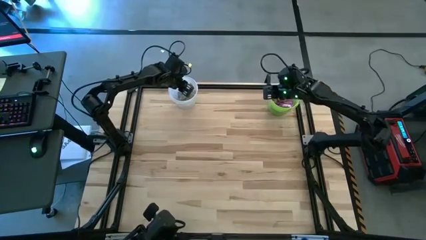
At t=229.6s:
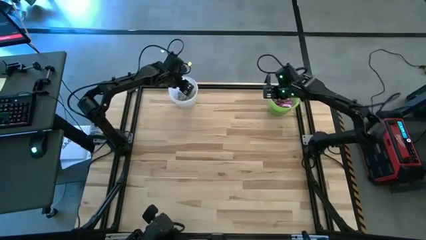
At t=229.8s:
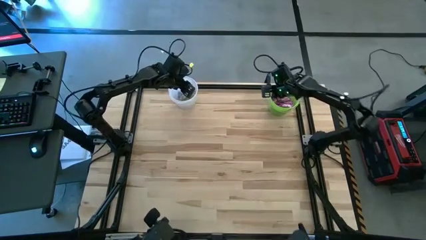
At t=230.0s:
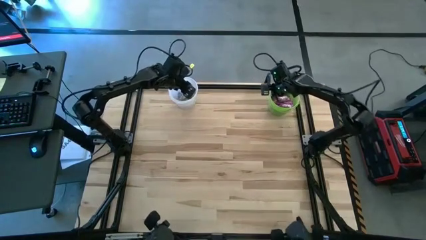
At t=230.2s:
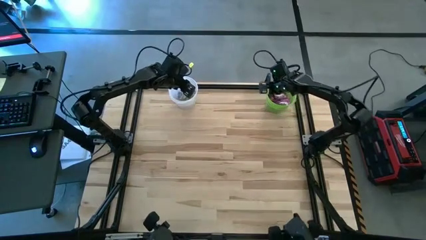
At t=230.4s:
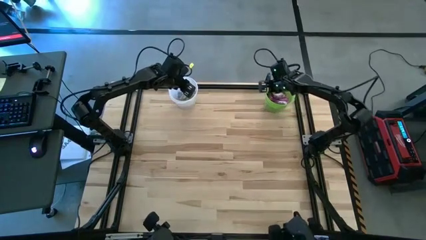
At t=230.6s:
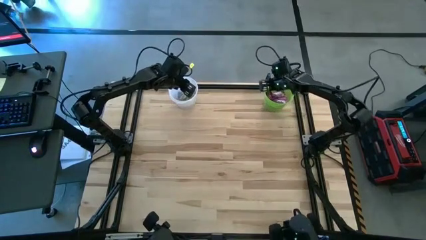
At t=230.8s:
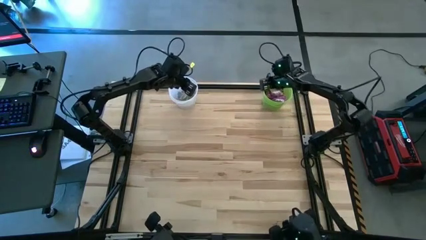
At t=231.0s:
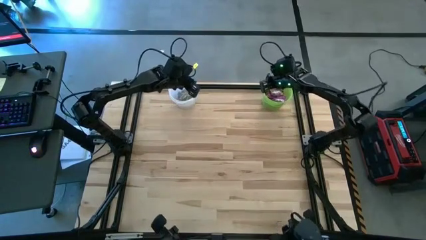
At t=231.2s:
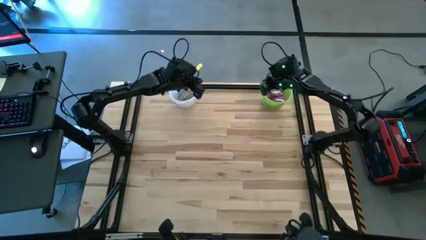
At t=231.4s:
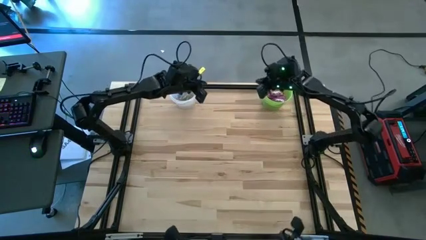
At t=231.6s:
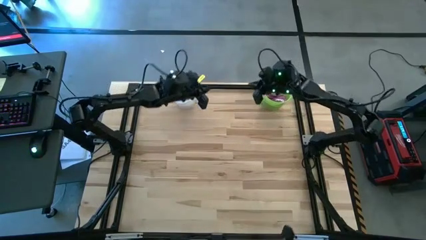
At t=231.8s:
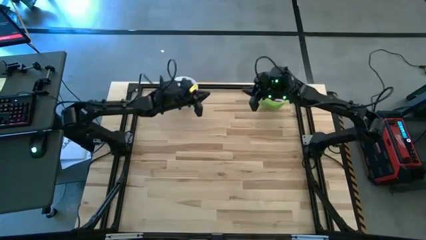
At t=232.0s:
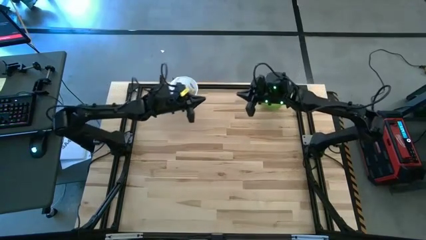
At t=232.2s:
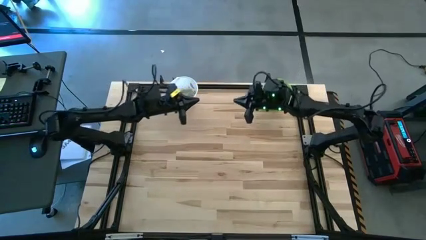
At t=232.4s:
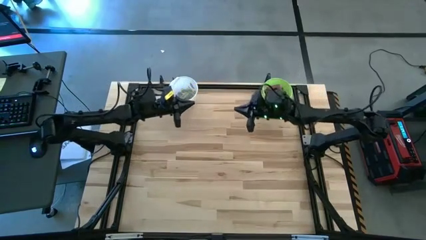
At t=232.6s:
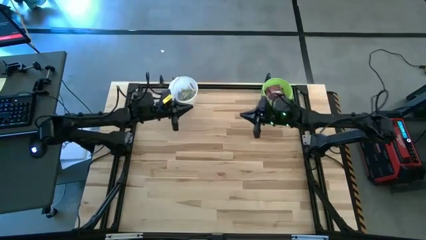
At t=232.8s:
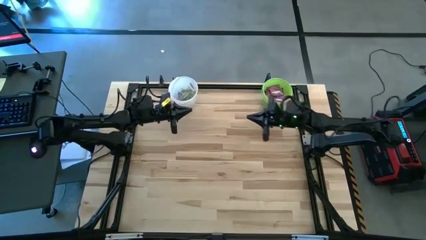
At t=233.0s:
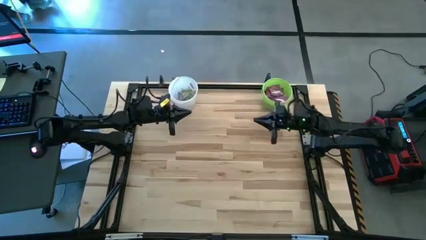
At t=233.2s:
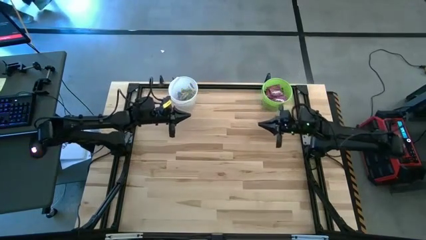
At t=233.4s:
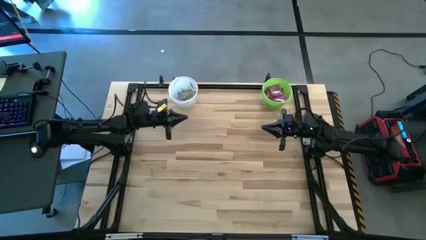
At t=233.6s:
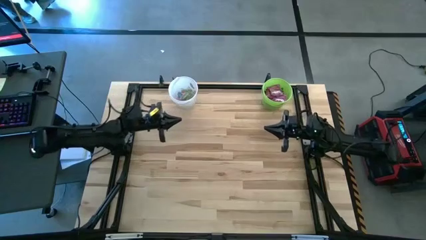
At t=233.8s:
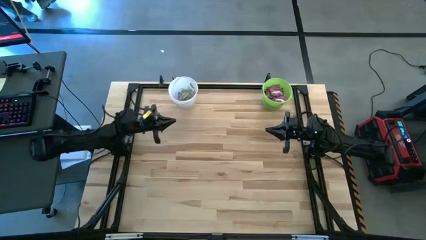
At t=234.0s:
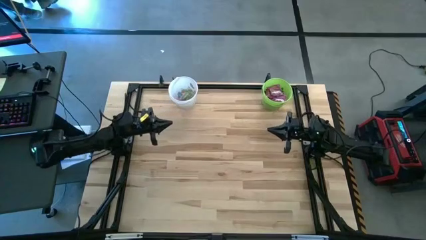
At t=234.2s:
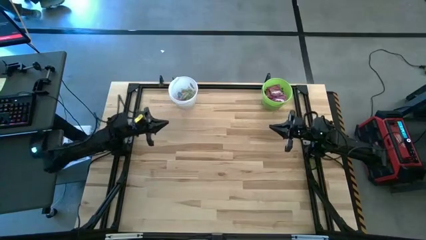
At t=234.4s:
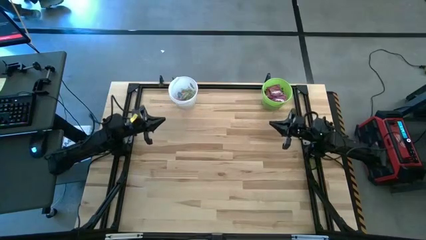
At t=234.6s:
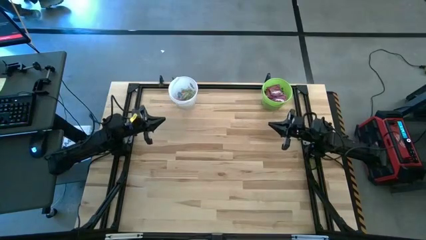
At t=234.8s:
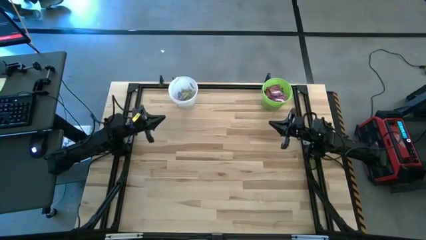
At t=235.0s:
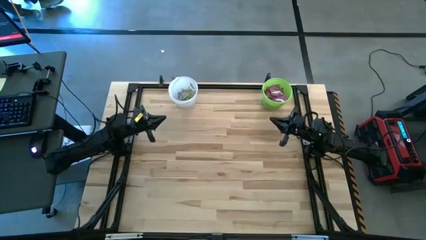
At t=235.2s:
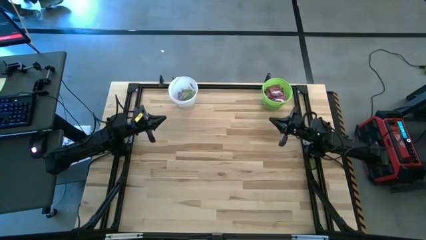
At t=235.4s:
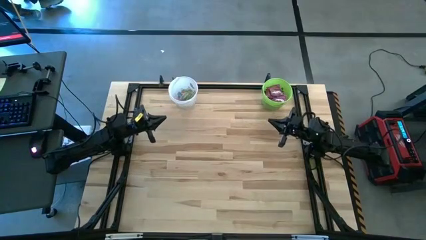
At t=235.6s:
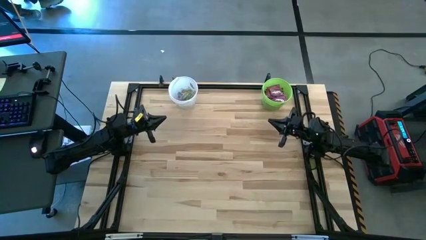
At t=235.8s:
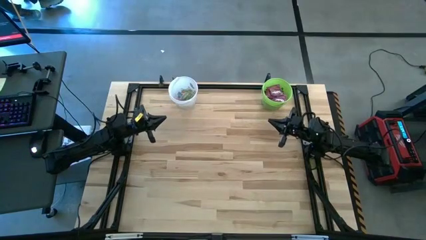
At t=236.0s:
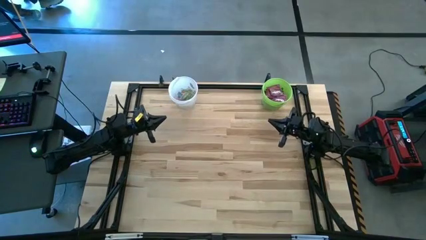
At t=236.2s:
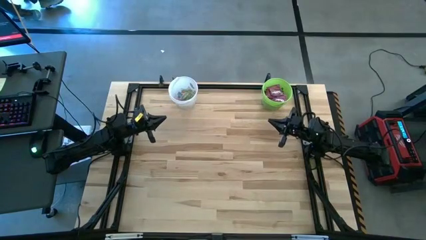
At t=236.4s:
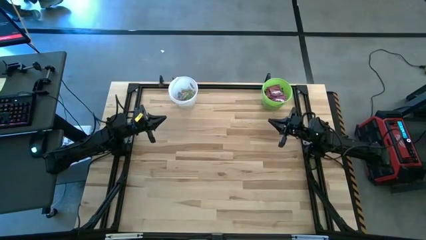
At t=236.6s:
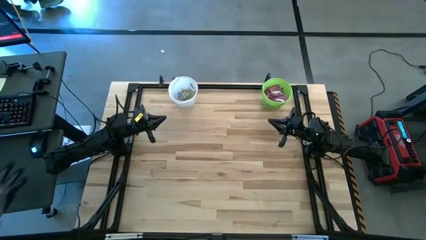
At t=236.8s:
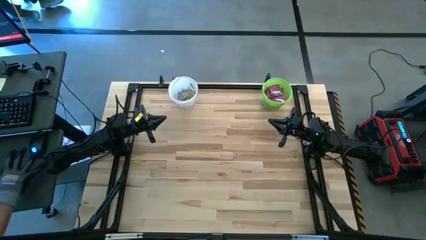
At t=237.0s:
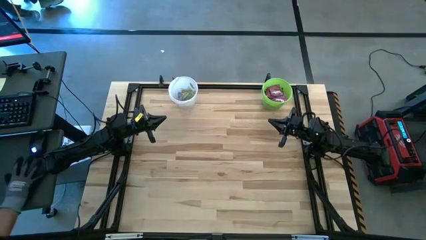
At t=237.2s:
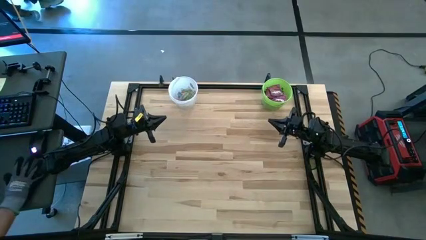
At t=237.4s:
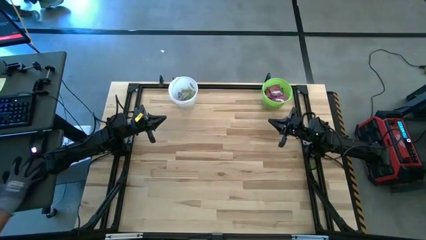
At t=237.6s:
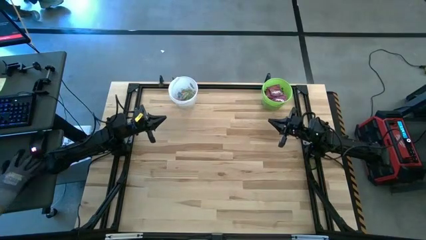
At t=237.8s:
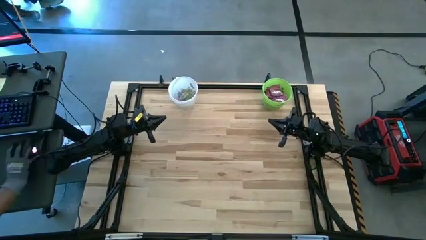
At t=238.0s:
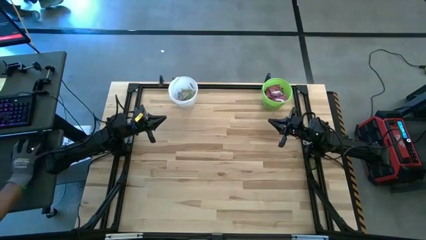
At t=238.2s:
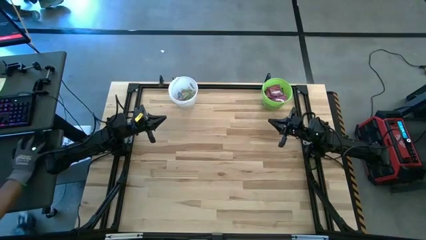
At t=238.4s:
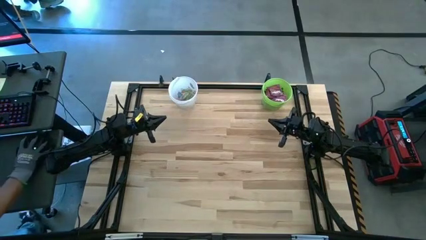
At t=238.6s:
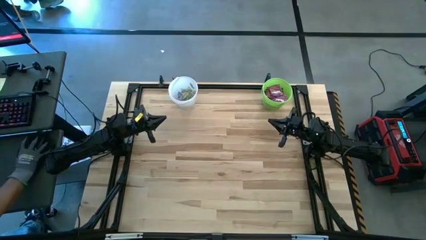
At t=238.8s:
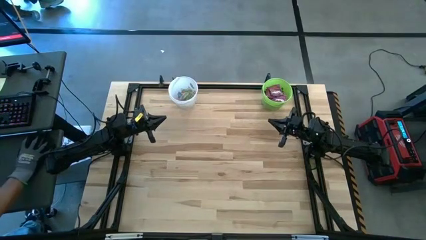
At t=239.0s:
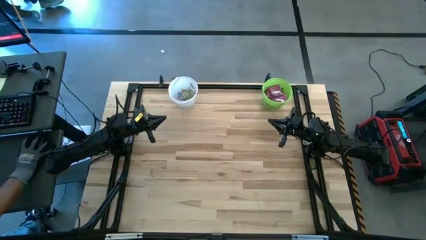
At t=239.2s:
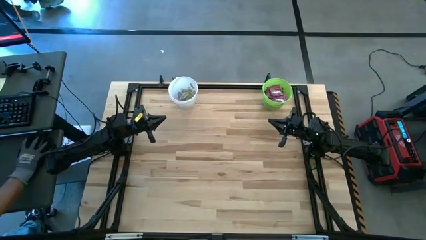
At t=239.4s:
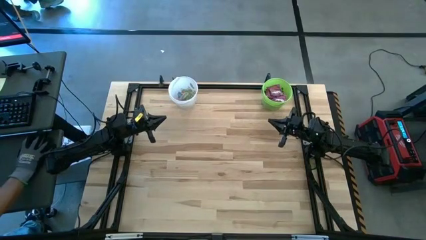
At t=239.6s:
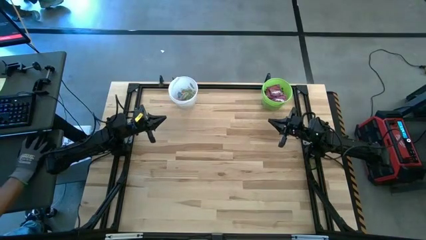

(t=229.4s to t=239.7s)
Task: Sort candy by brand, put in halloween buckets
Return to Home Position

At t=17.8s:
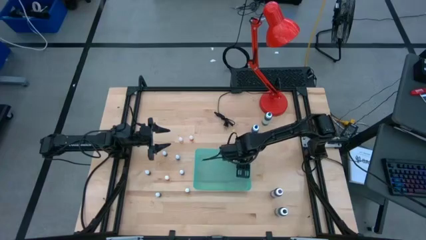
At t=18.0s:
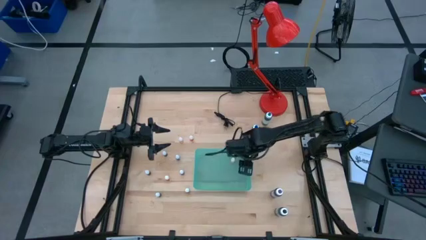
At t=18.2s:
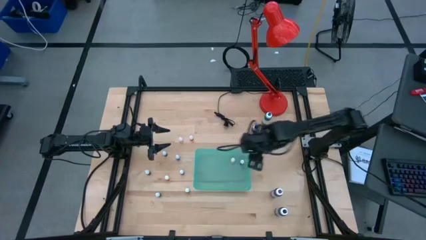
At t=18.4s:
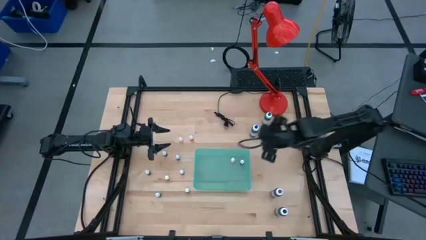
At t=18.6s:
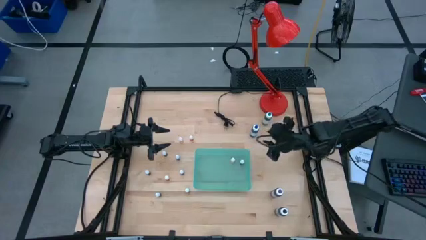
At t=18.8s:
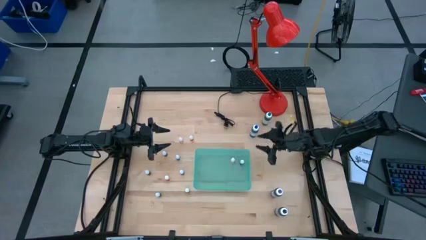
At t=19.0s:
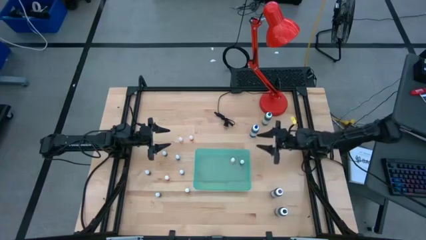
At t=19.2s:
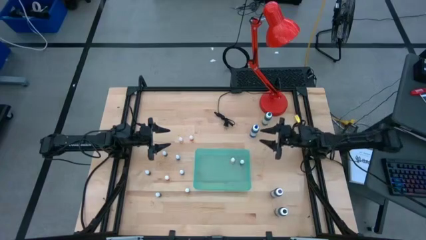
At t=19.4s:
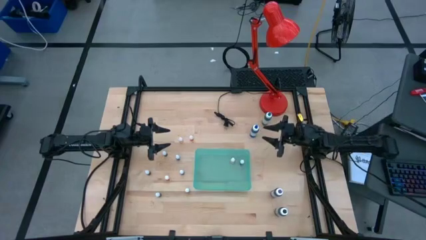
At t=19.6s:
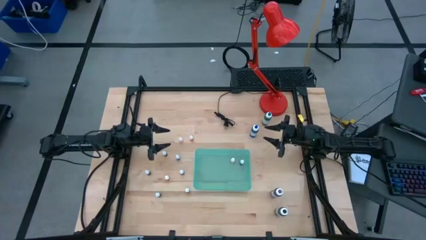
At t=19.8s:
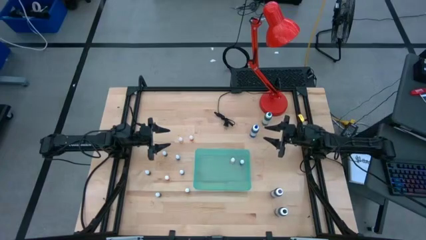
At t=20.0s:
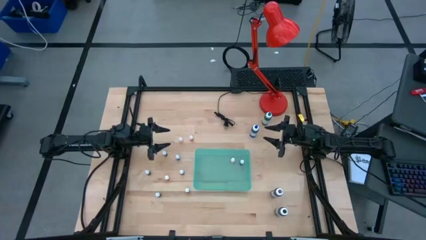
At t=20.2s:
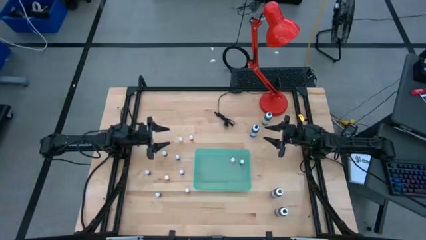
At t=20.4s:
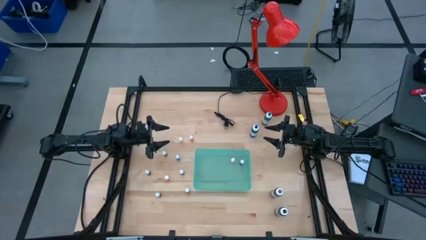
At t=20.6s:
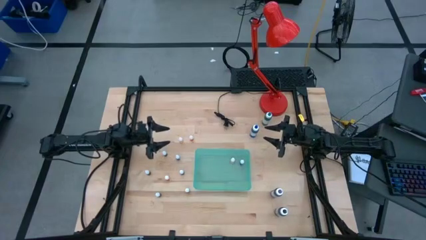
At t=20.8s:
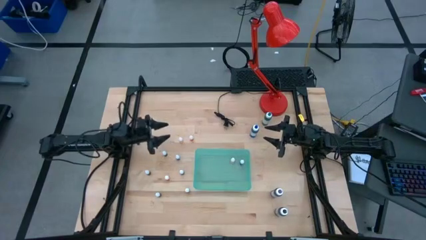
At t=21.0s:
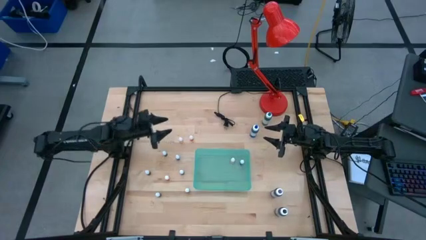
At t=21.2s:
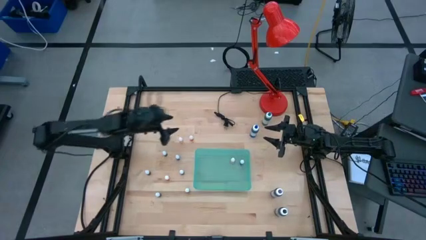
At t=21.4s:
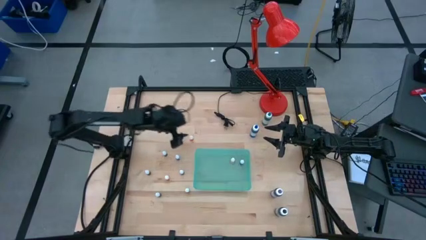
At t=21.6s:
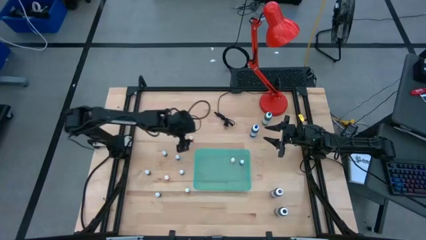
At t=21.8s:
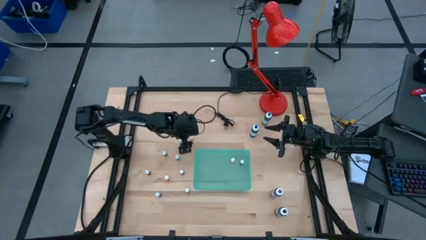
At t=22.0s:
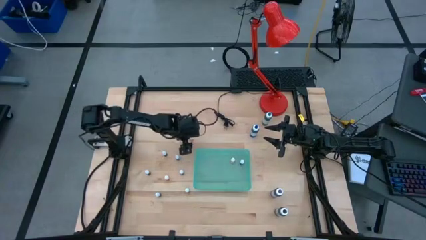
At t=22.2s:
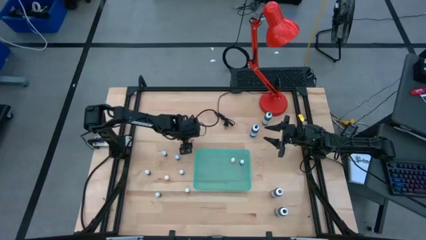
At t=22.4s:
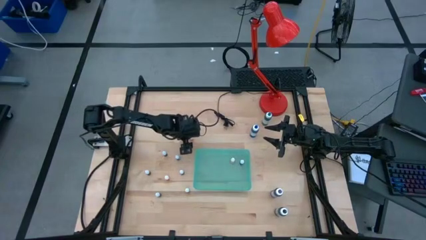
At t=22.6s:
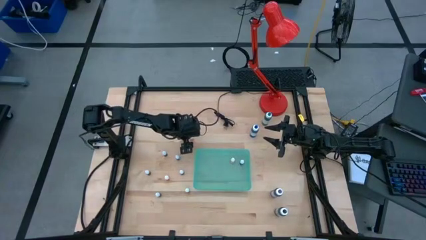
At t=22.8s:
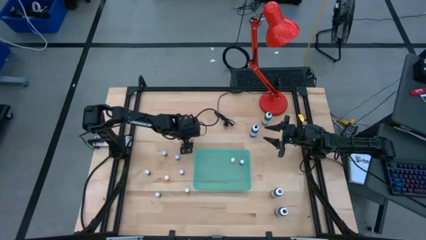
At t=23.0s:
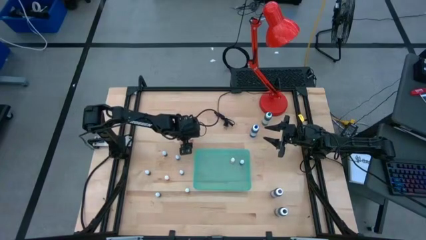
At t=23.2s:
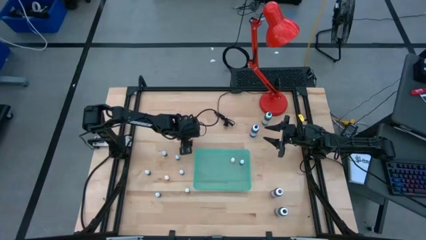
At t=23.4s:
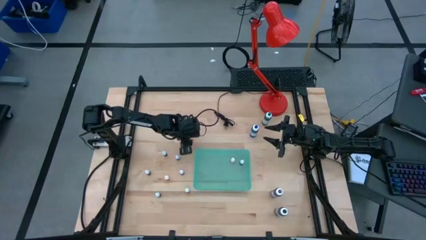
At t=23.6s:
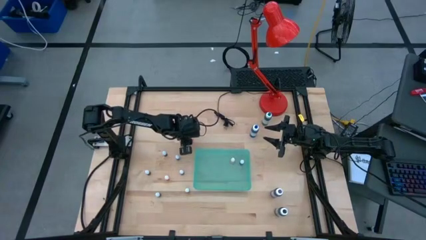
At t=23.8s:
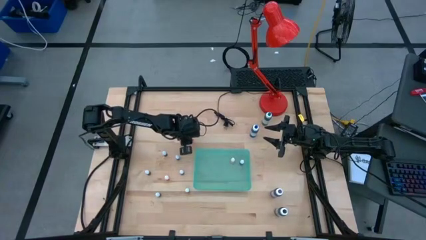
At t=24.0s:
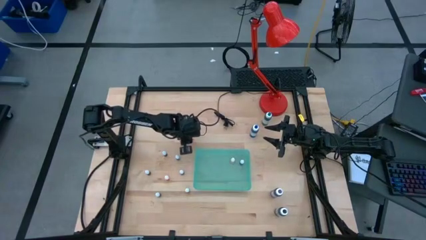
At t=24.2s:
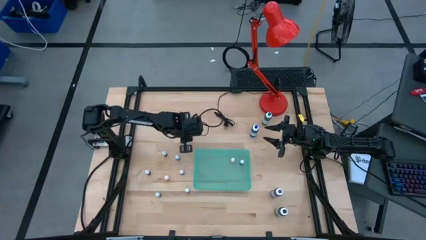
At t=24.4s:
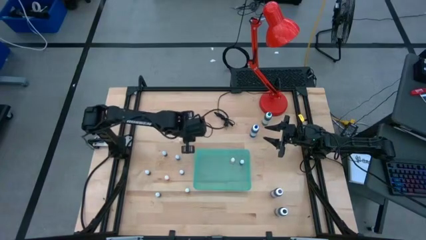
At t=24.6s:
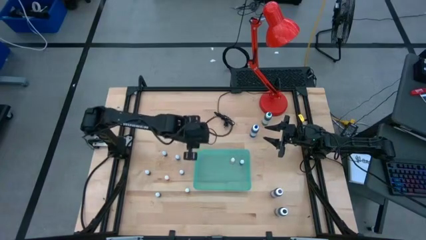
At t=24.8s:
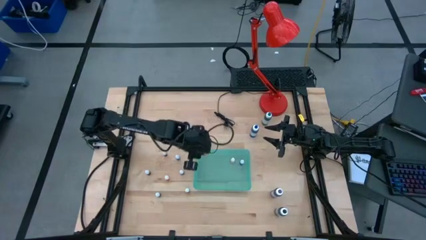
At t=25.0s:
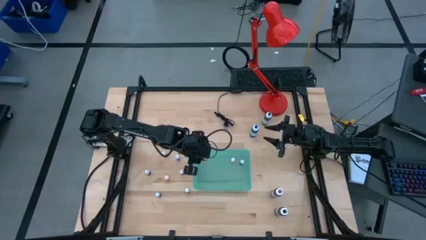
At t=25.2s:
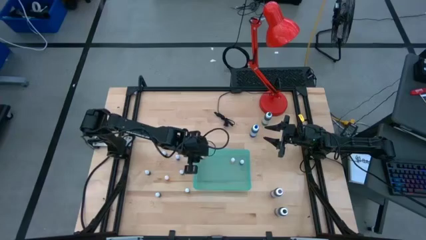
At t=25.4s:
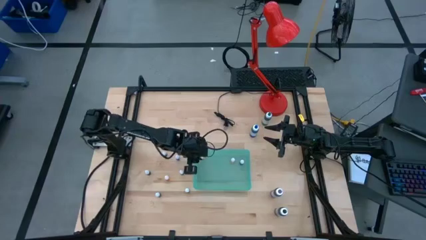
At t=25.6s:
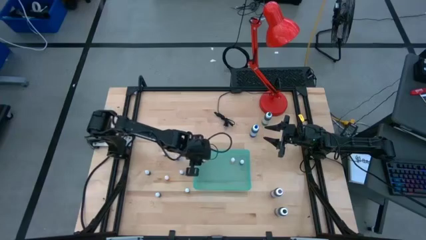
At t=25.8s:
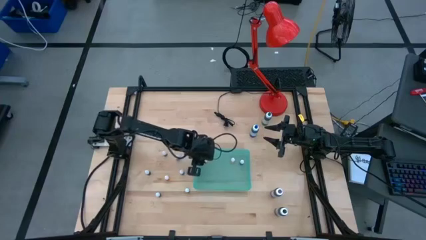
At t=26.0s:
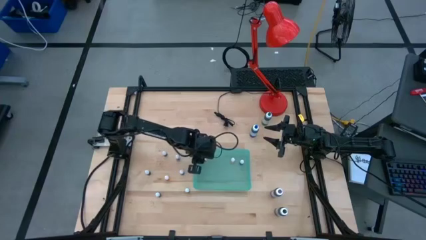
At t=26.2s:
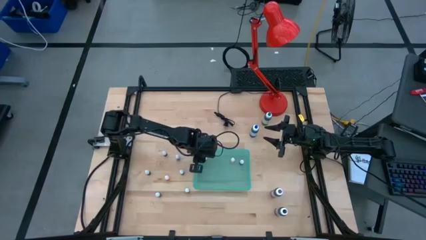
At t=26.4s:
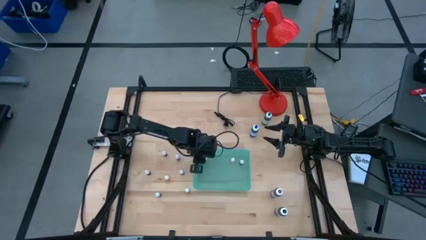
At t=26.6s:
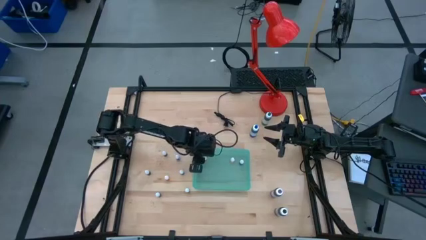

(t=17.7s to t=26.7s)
Task: Pick & Place food coloring
Put the small yellow food coloring bottle into the light blue bin
